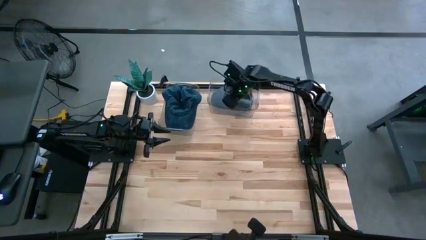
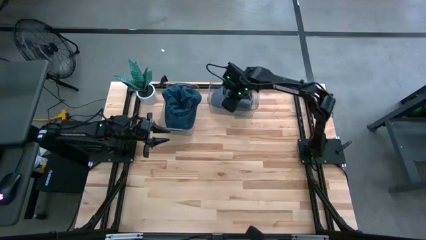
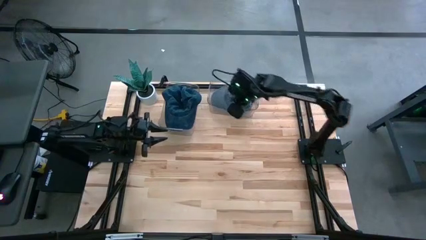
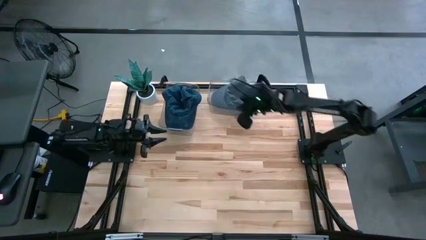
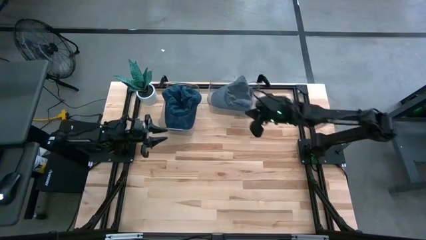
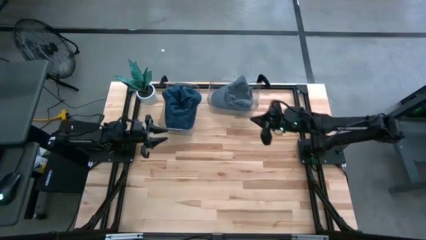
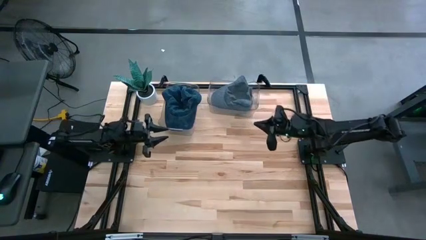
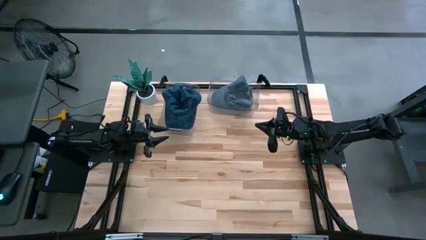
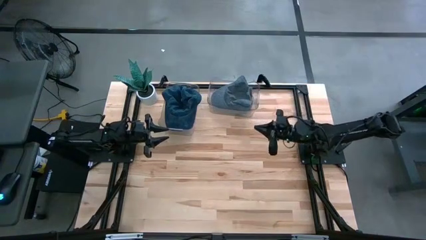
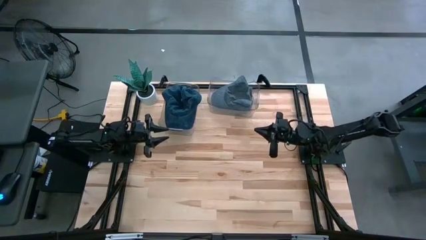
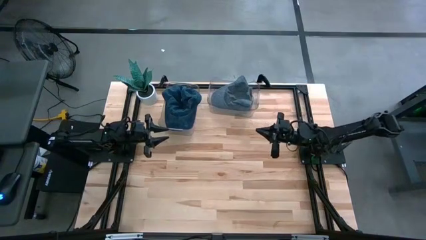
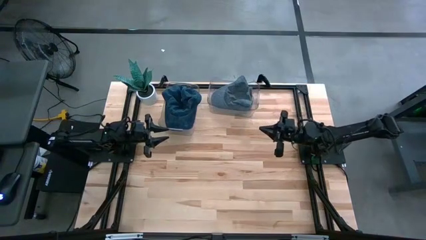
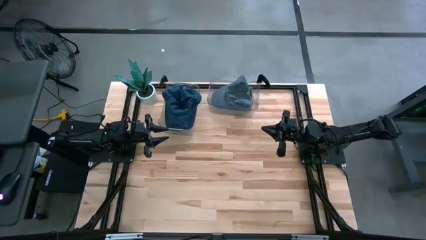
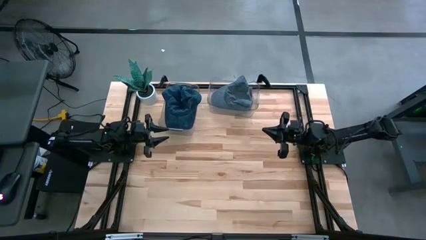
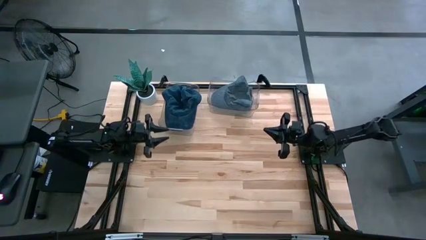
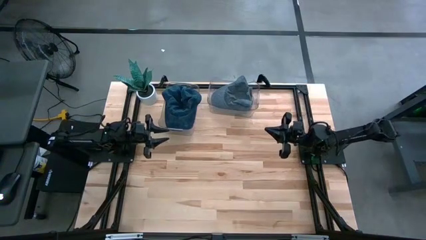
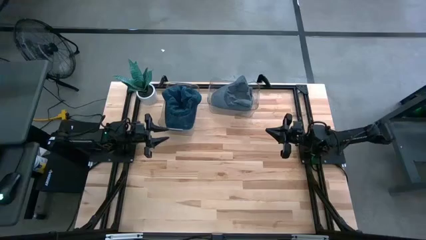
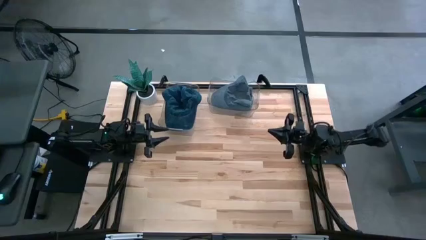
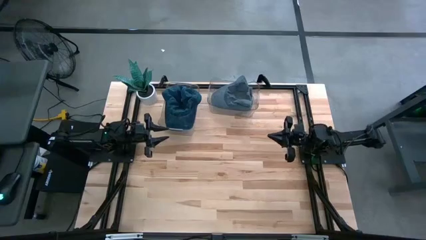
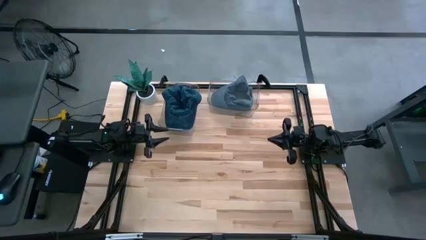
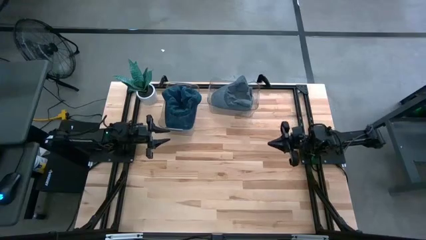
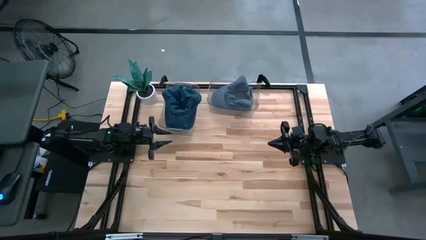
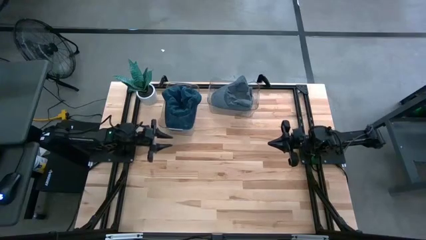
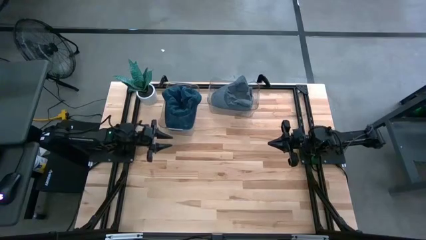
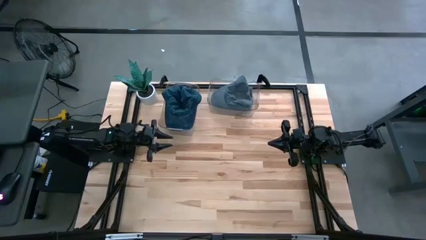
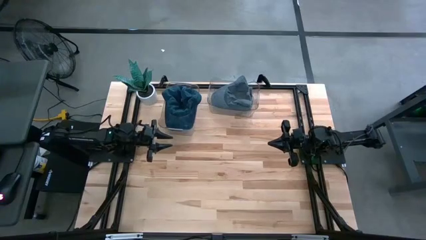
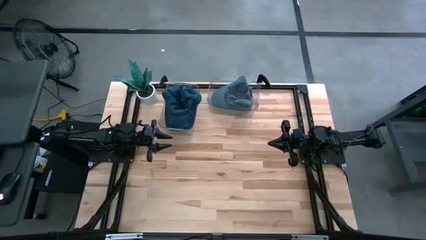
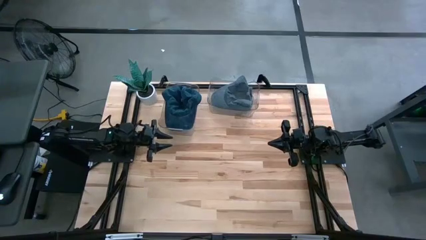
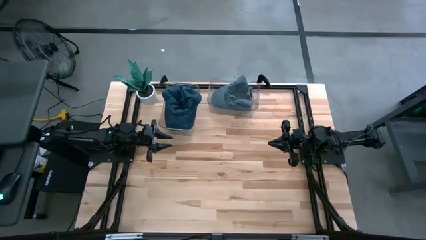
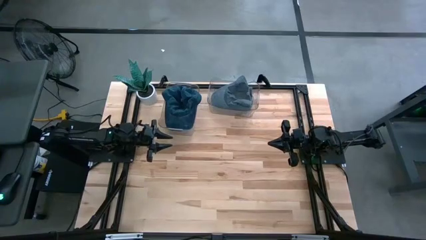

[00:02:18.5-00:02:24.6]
Task: Pick & Place hat
Return to Home Position

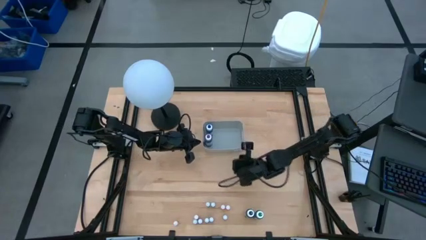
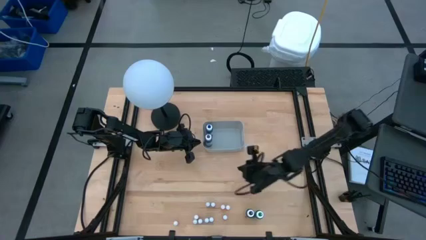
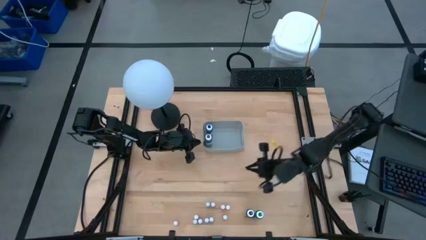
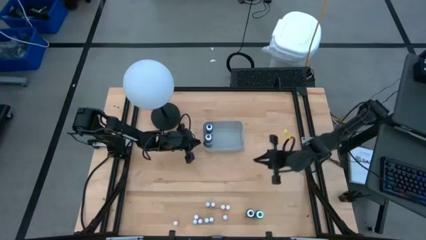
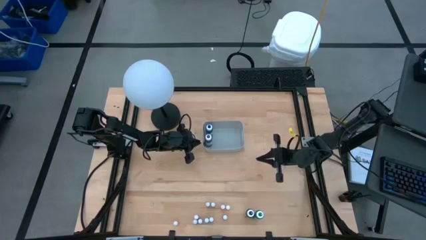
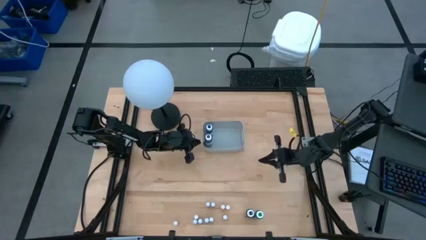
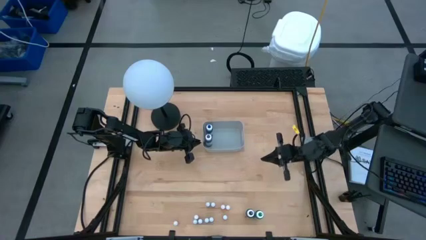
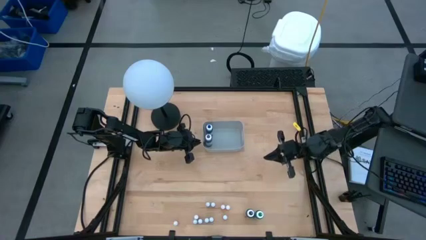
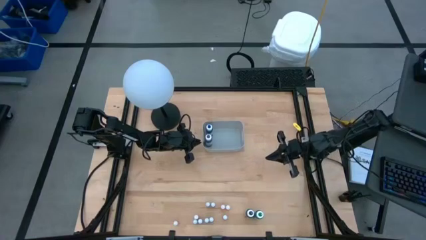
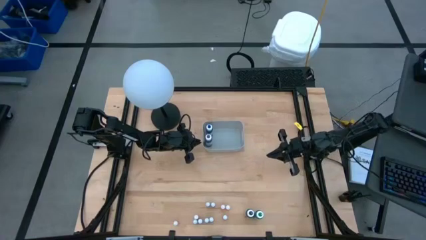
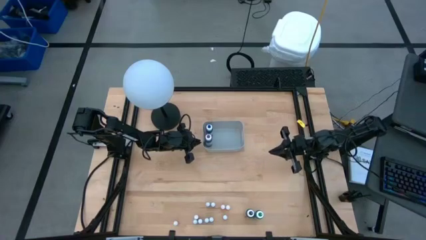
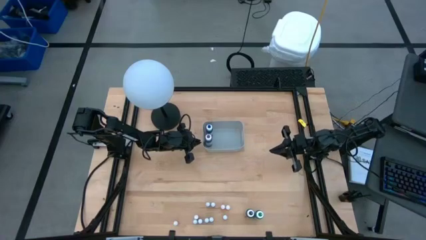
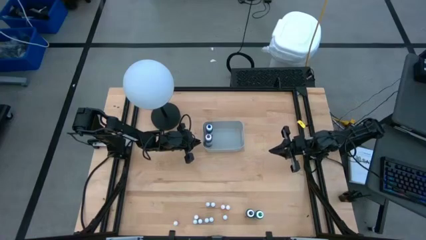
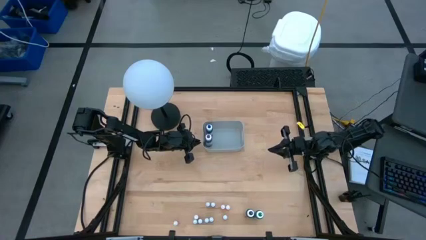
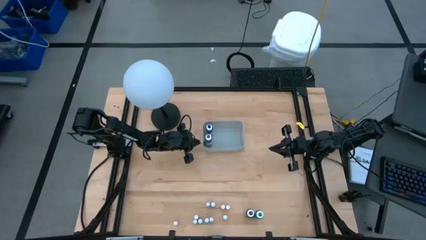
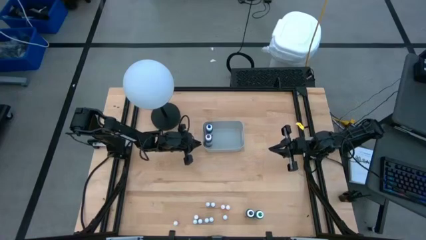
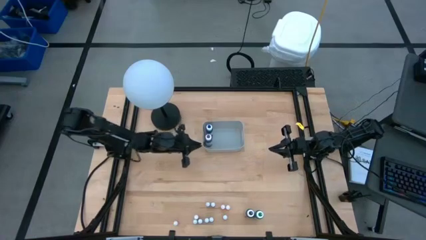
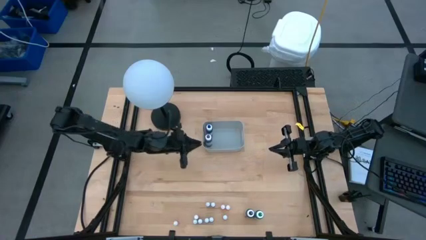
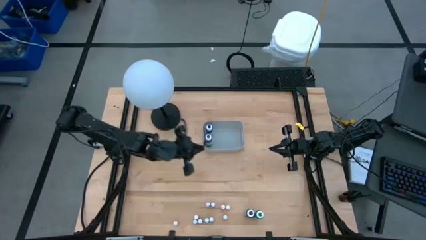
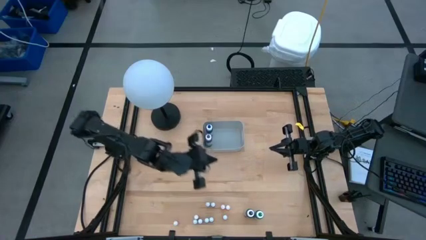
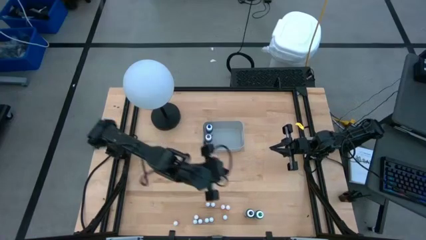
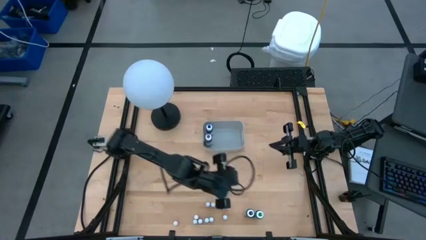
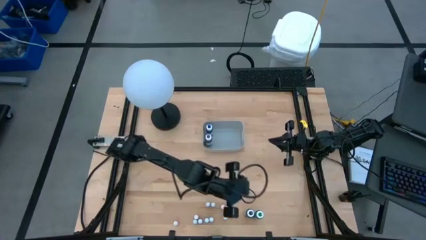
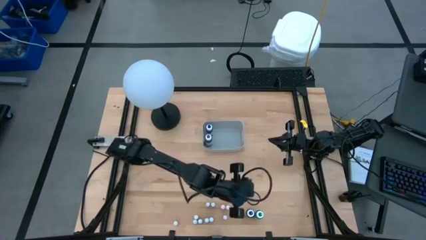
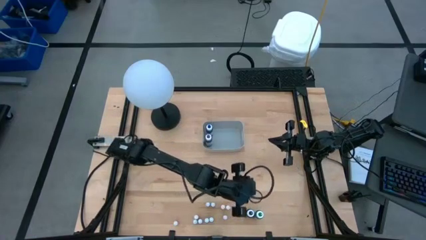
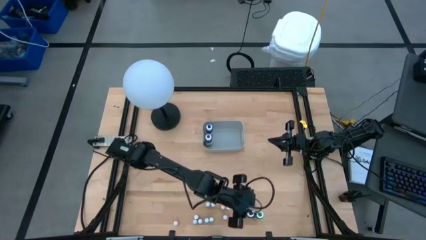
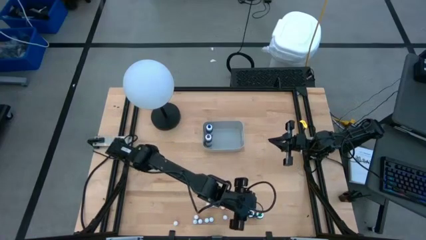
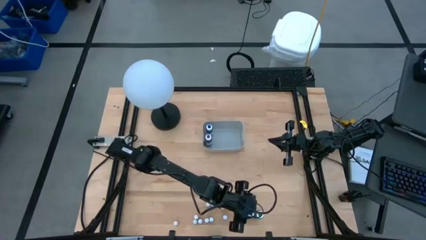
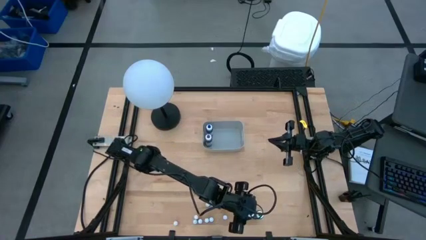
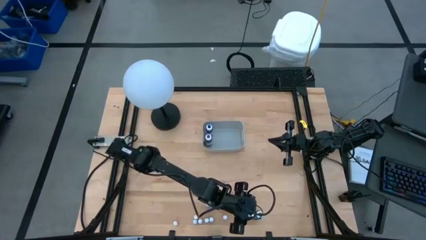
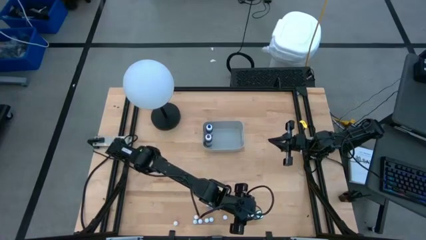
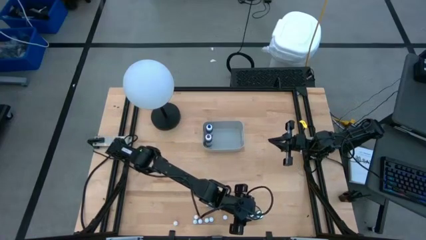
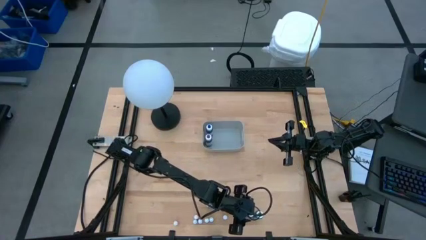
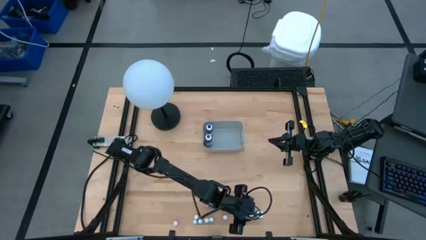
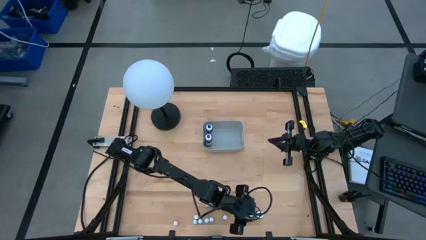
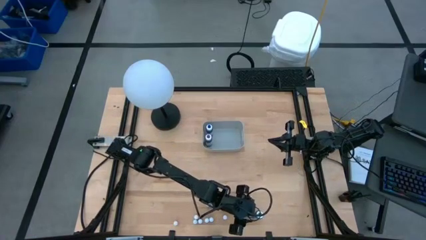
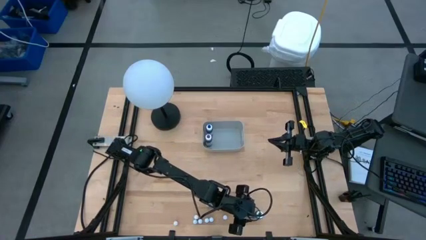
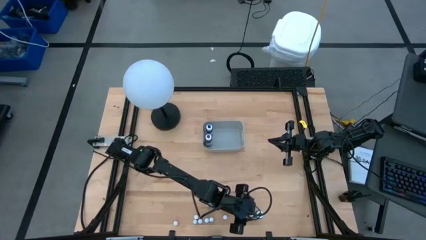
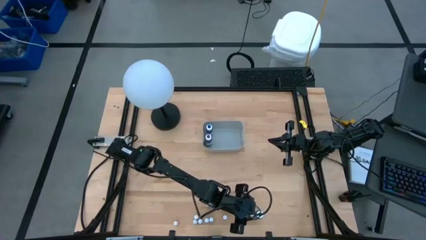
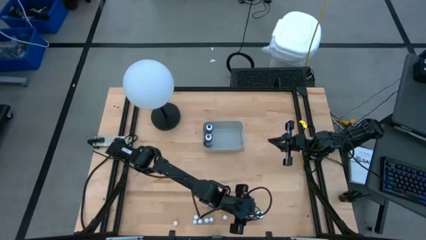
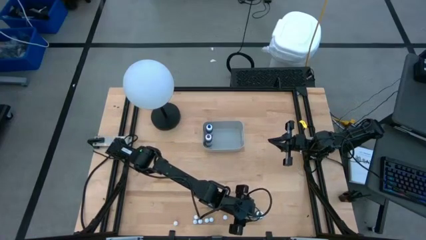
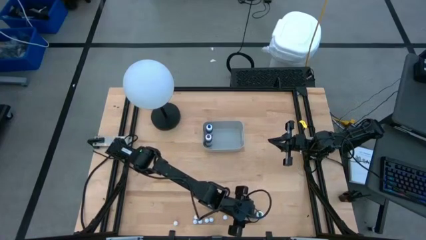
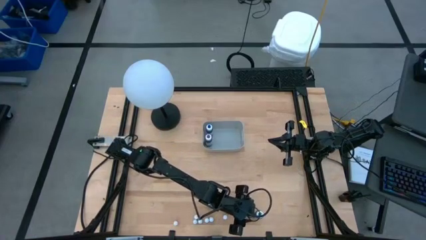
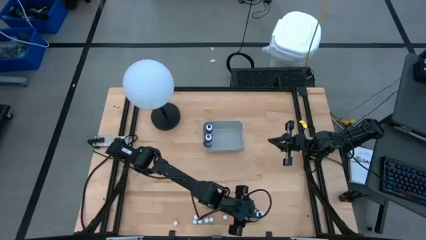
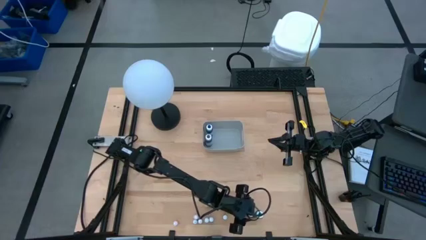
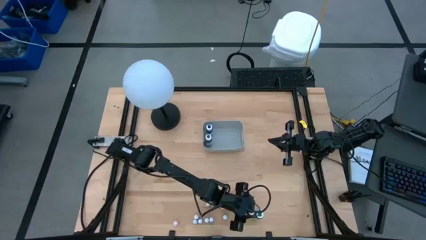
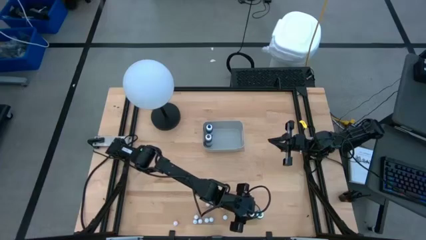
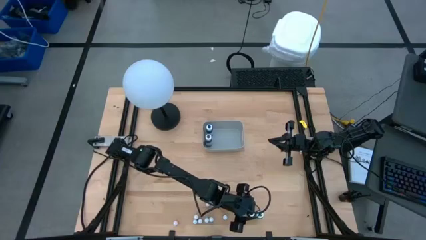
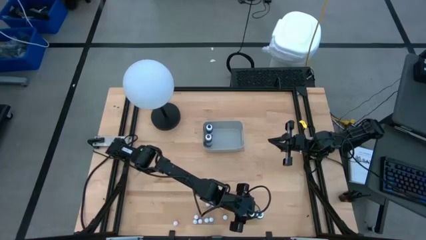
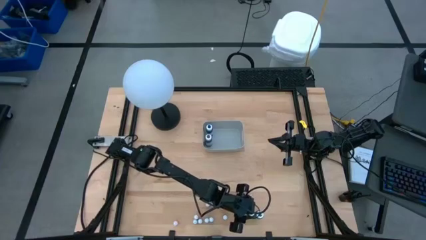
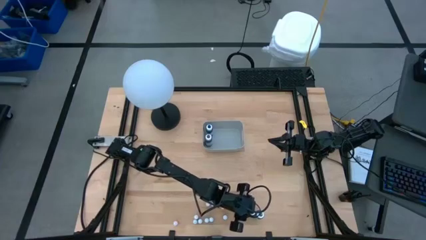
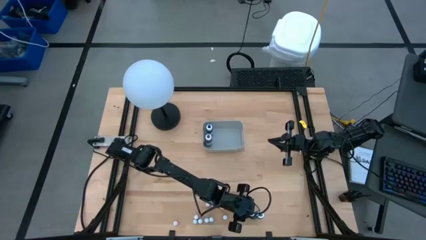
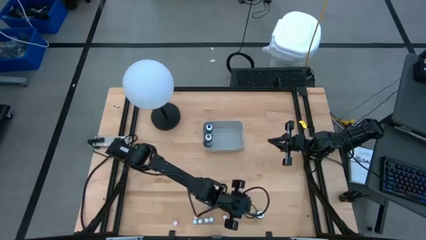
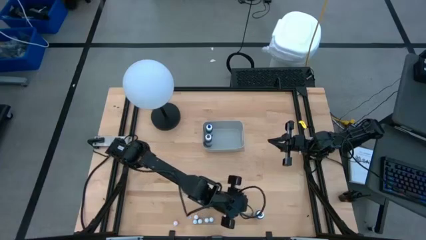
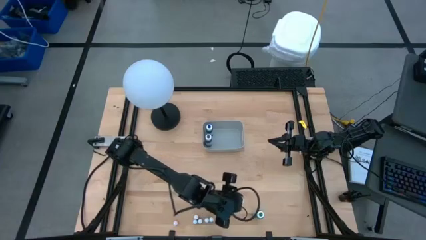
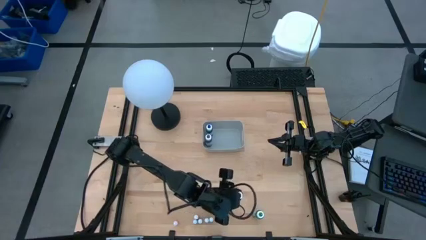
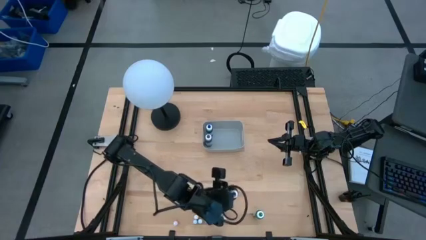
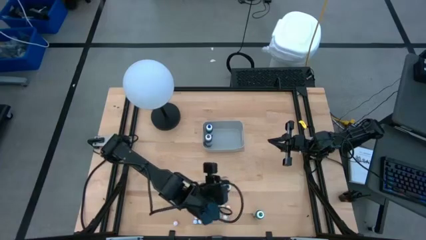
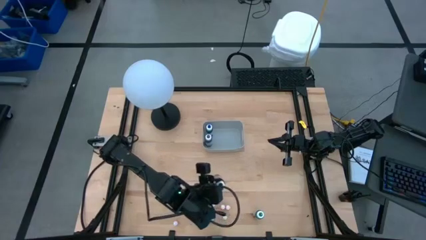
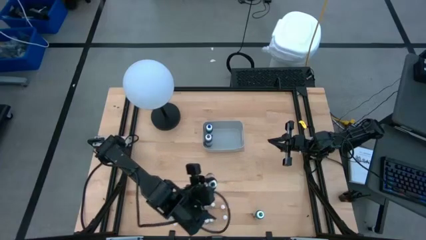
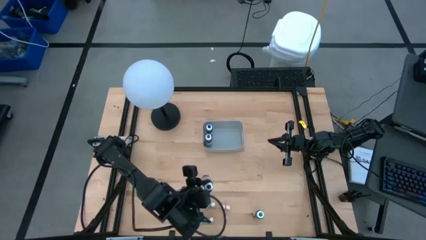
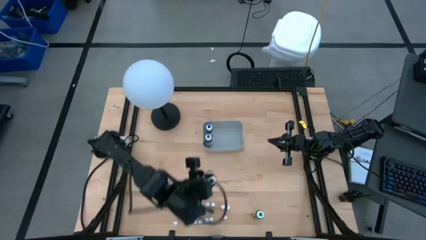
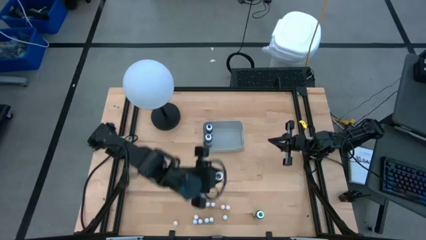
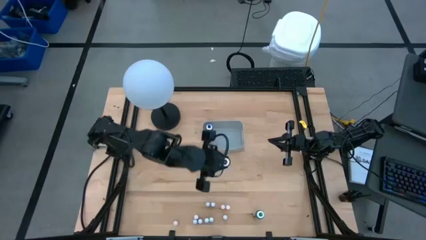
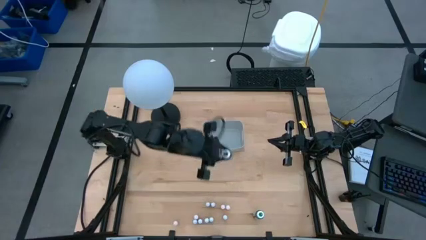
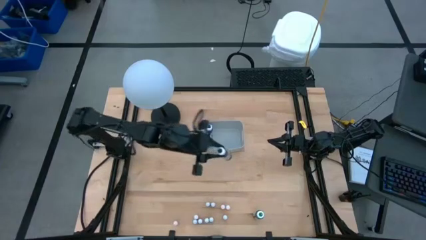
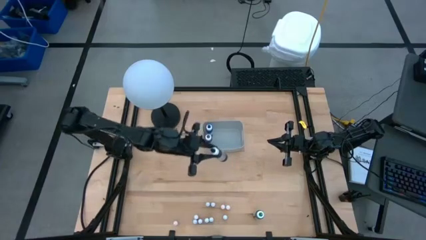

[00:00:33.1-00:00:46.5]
Task: Pick & Place food coloring
Put the large black food coloring bottle into the gray bin
